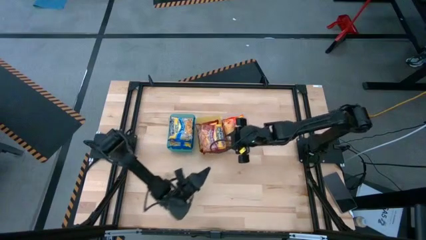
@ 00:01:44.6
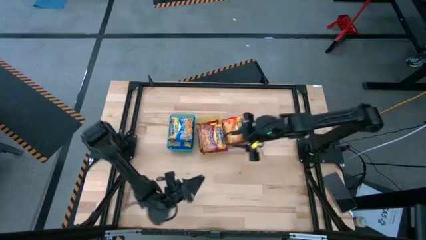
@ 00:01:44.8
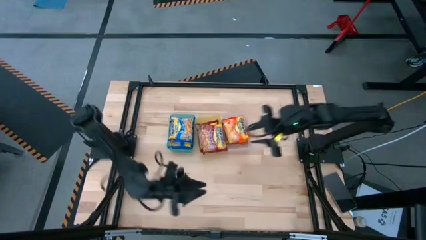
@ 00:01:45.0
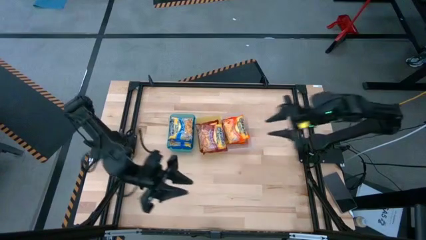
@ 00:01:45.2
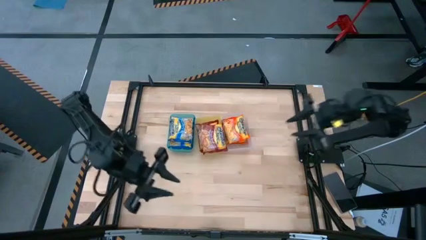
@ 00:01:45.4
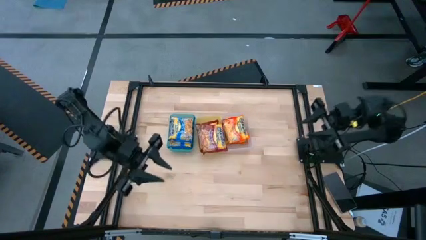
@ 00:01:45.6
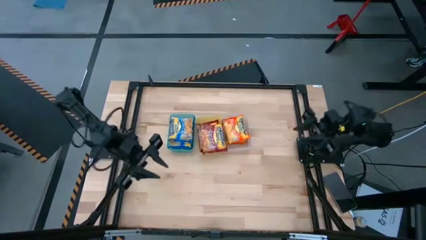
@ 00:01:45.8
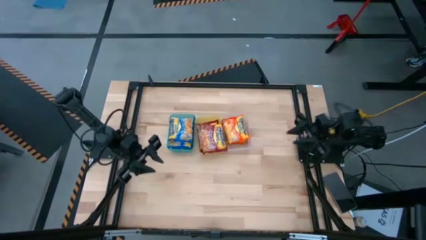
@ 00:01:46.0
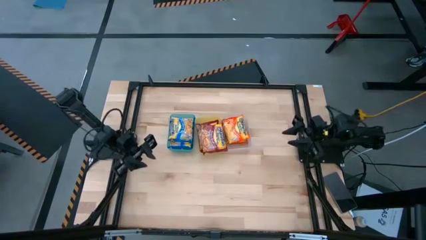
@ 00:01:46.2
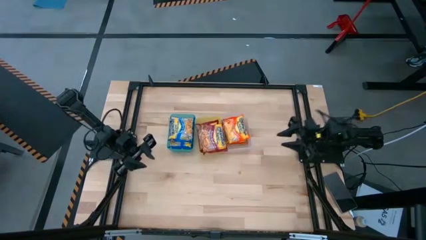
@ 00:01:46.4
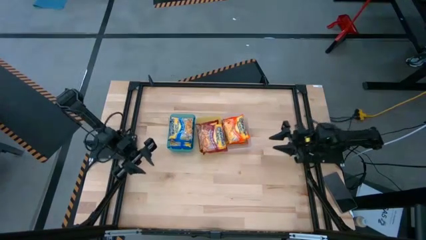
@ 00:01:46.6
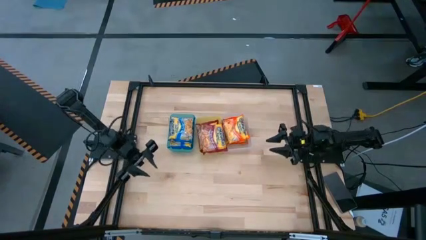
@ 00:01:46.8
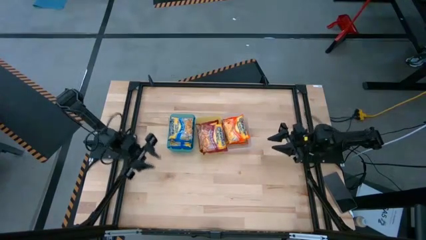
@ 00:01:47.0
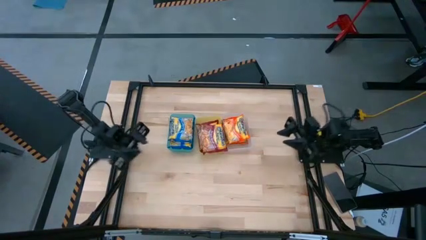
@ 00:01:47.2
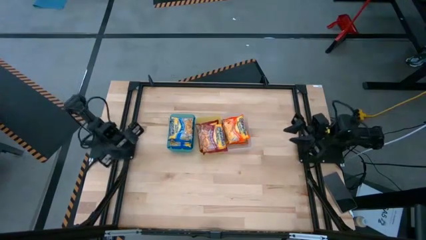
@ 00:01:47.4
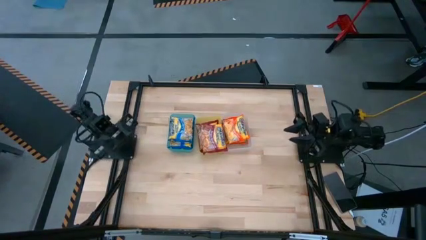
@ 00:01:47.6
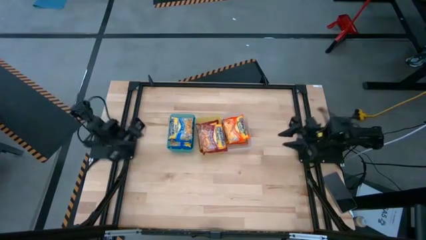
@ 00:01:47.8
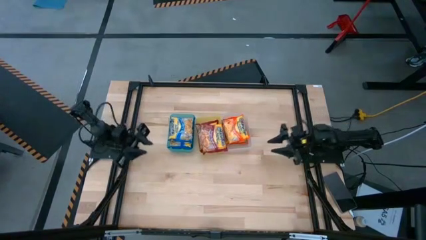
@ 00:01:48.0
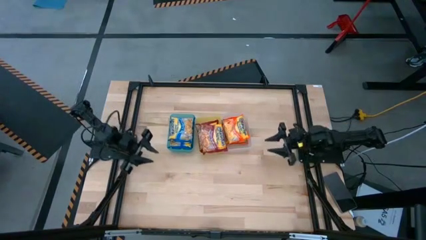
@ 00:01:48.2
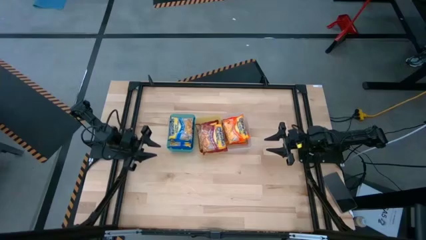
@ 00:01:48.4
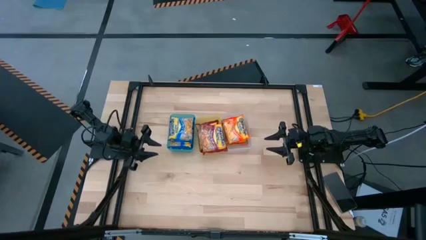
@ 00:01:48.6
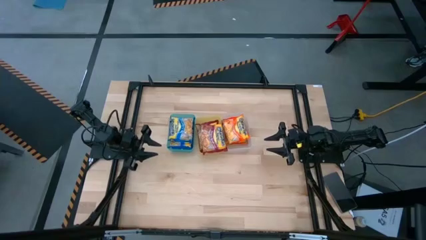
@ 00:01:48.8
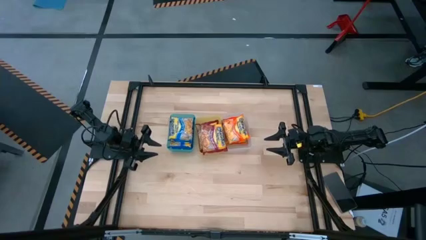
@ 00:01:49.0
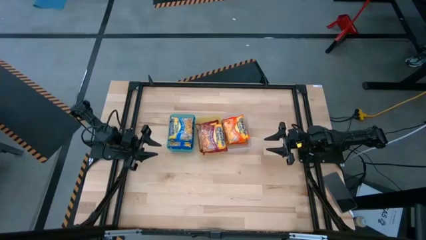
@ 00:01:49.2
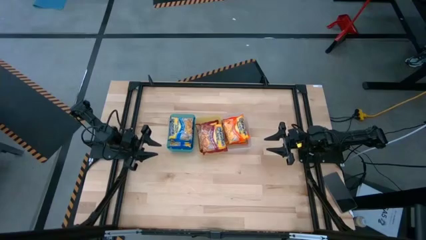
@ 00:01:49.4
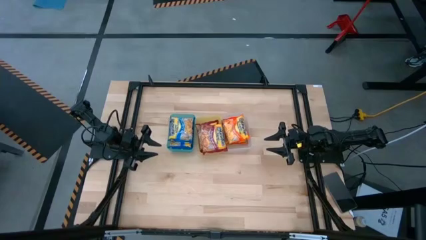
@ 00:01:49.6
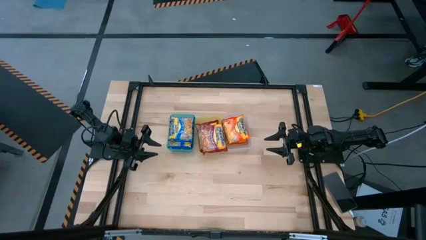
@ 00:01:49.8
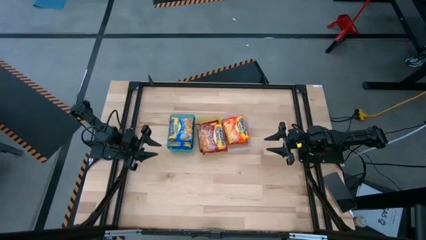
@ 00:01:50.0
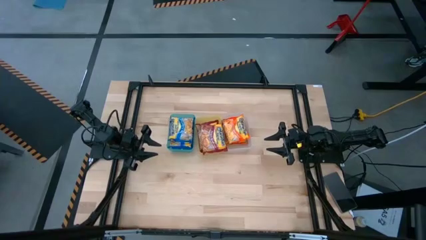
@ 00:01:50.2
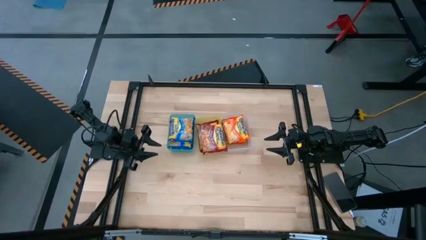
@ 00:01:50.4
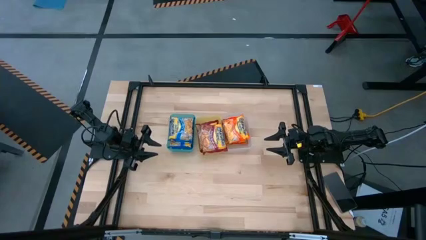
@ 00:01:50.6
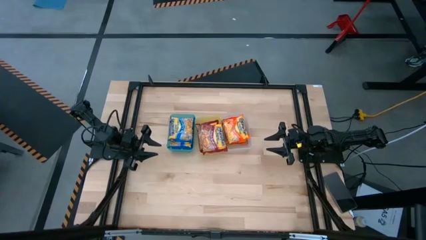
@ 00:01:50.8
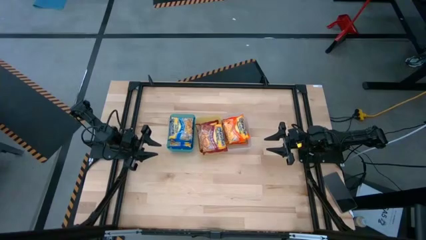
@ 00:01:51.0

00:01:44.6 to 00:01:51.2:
Task: Sort Maruchan noodles
Return to Home Position

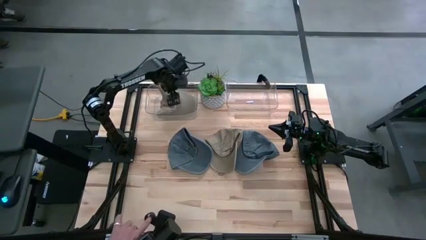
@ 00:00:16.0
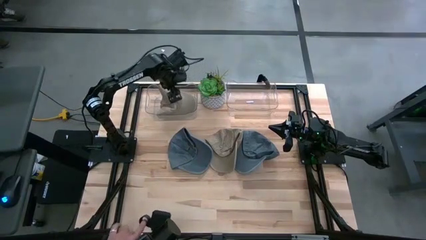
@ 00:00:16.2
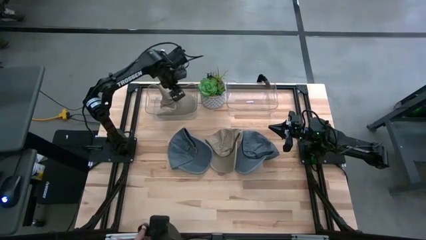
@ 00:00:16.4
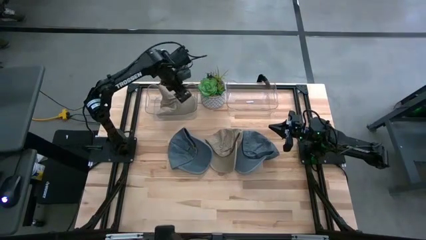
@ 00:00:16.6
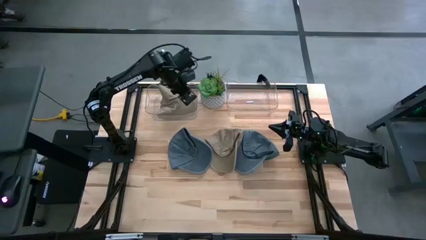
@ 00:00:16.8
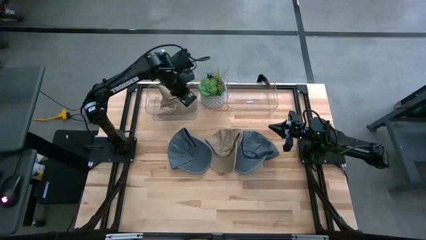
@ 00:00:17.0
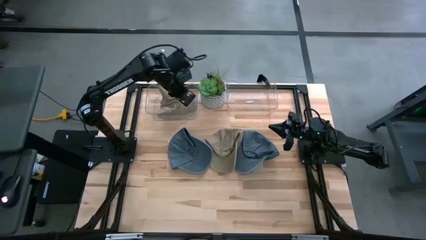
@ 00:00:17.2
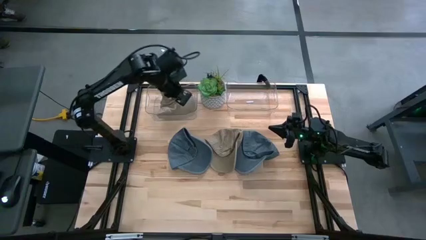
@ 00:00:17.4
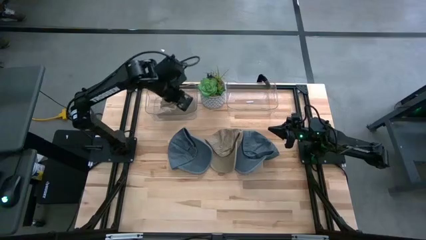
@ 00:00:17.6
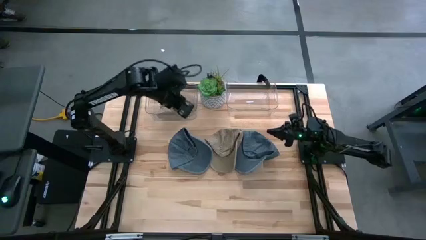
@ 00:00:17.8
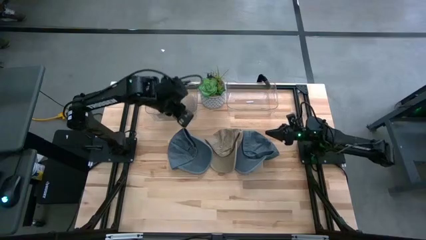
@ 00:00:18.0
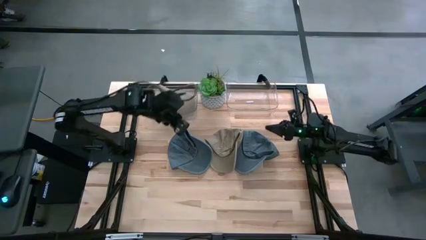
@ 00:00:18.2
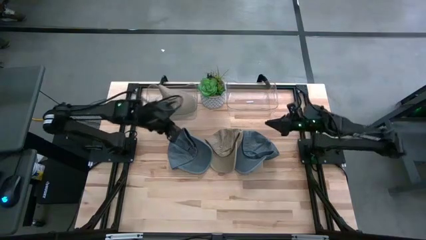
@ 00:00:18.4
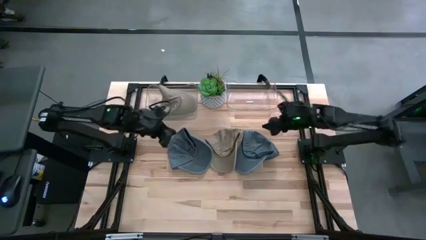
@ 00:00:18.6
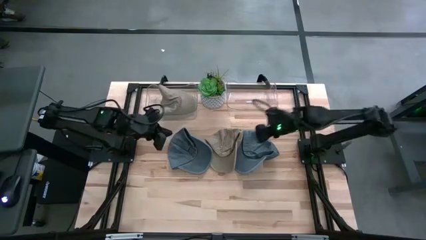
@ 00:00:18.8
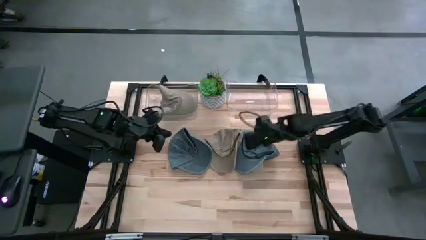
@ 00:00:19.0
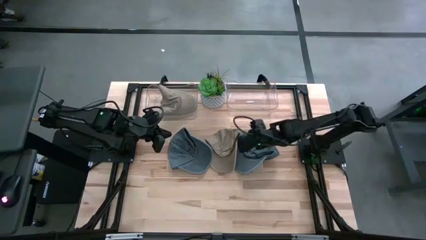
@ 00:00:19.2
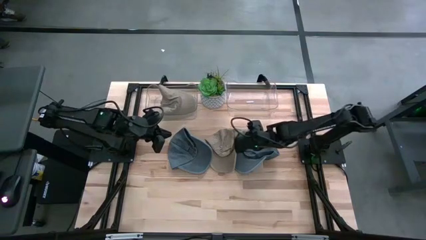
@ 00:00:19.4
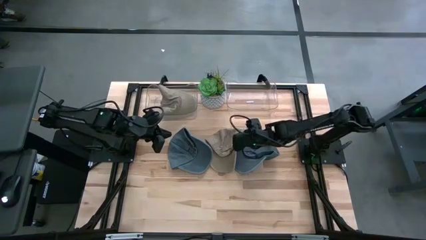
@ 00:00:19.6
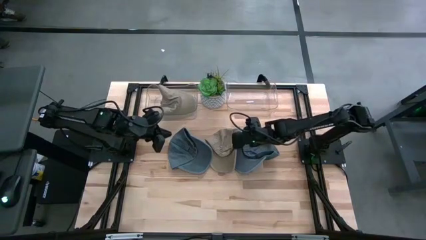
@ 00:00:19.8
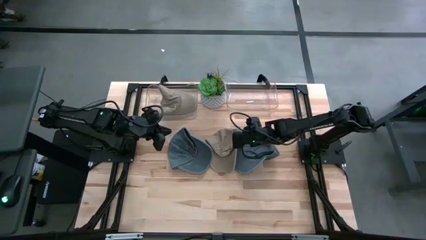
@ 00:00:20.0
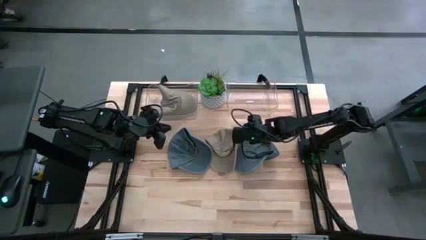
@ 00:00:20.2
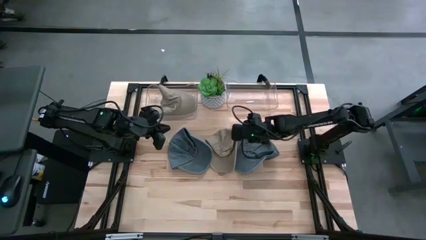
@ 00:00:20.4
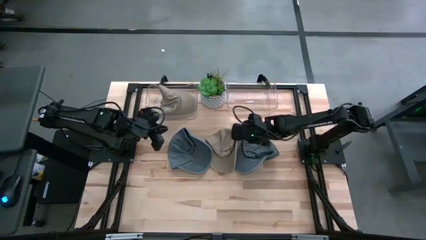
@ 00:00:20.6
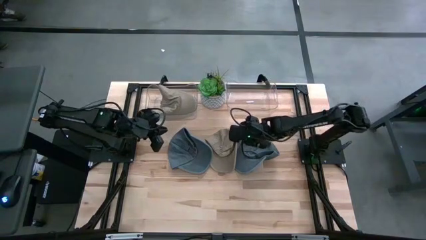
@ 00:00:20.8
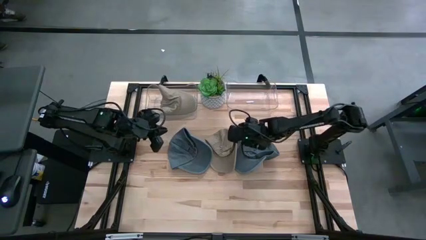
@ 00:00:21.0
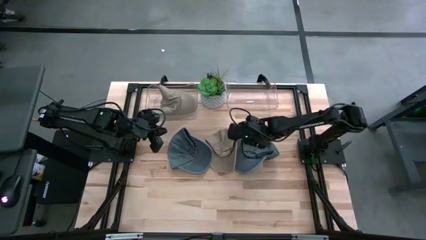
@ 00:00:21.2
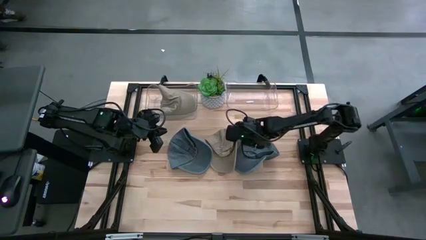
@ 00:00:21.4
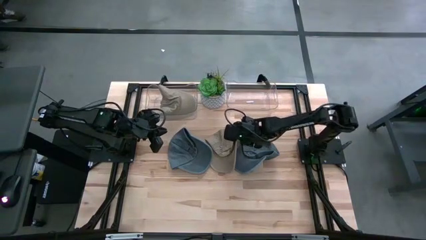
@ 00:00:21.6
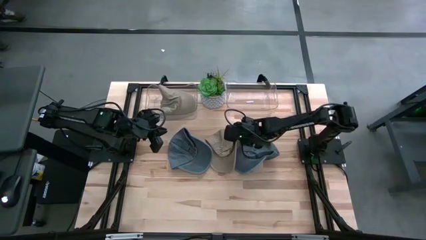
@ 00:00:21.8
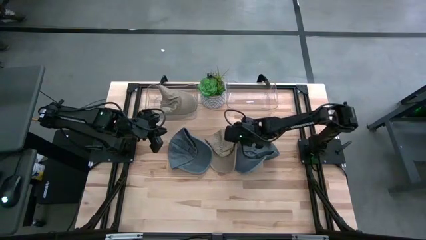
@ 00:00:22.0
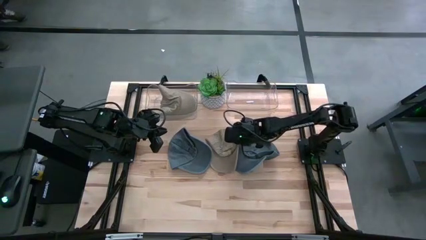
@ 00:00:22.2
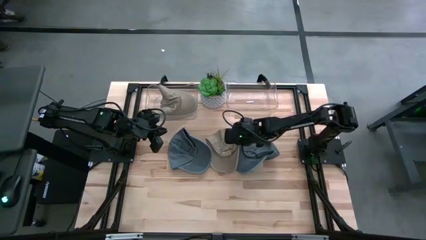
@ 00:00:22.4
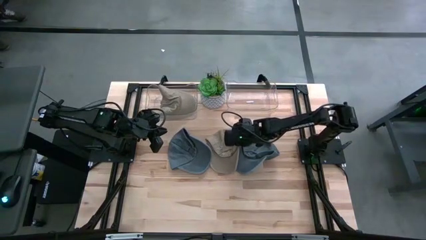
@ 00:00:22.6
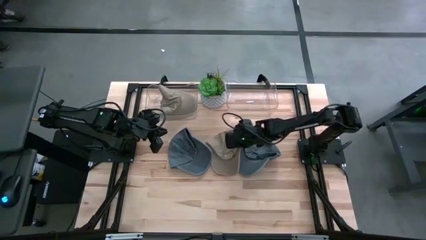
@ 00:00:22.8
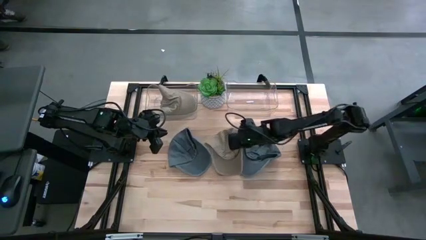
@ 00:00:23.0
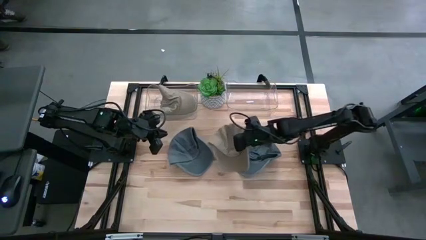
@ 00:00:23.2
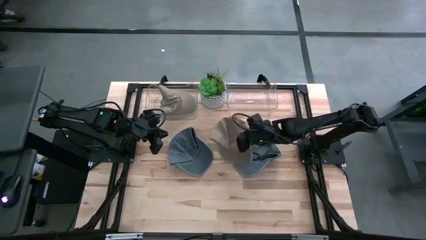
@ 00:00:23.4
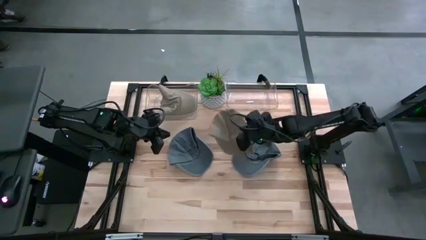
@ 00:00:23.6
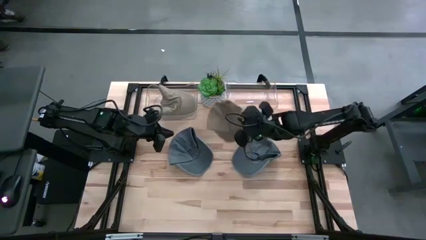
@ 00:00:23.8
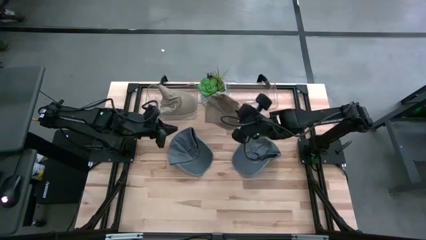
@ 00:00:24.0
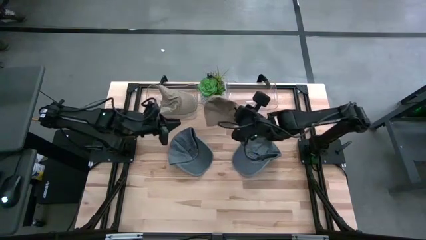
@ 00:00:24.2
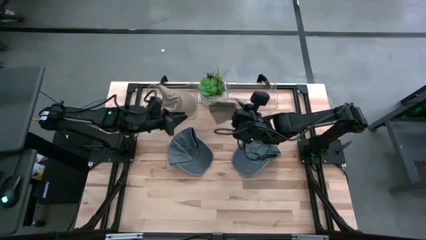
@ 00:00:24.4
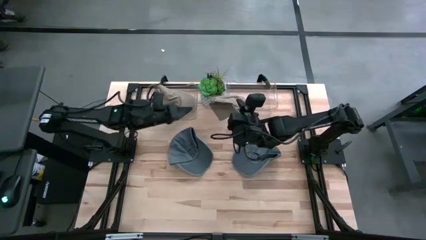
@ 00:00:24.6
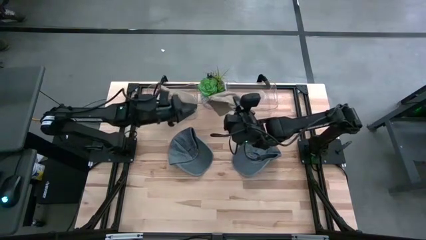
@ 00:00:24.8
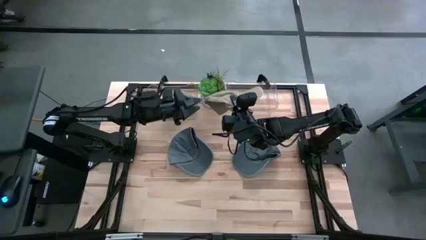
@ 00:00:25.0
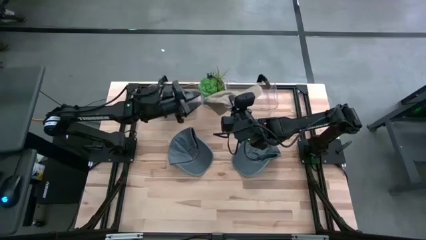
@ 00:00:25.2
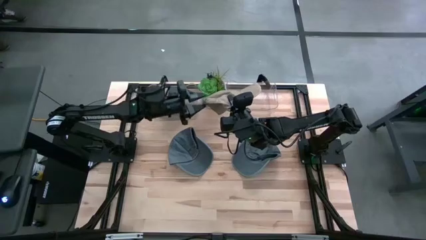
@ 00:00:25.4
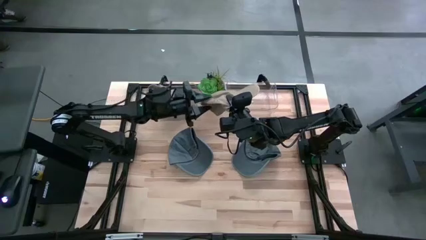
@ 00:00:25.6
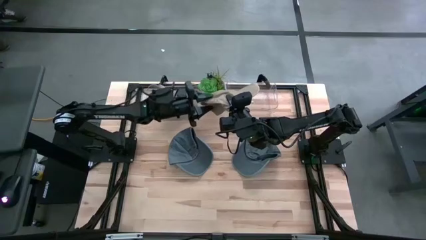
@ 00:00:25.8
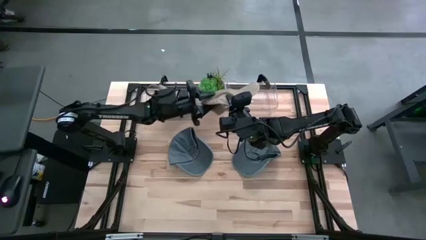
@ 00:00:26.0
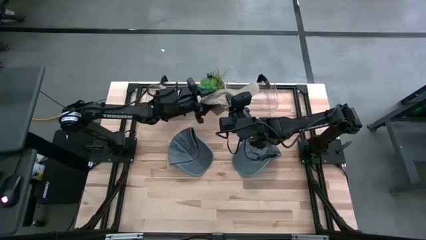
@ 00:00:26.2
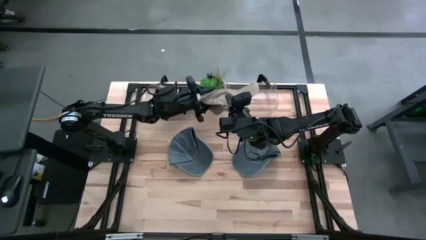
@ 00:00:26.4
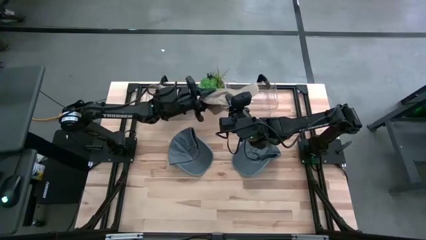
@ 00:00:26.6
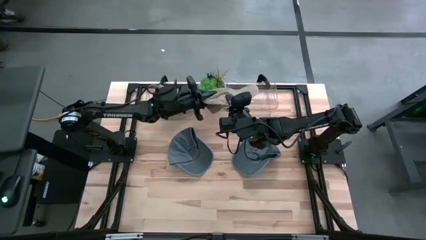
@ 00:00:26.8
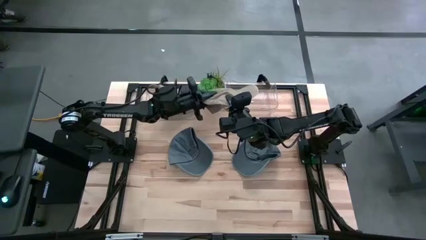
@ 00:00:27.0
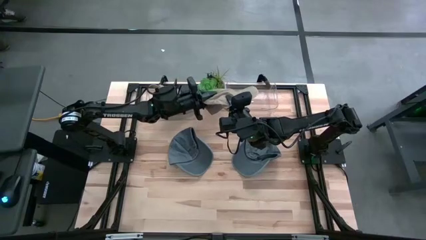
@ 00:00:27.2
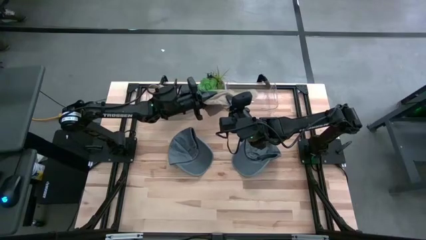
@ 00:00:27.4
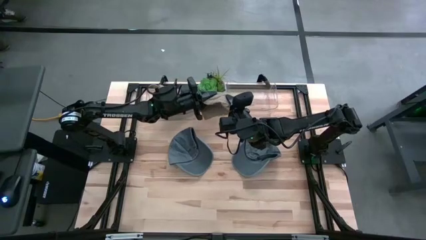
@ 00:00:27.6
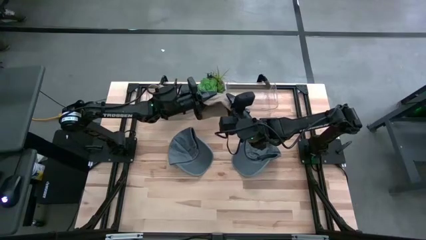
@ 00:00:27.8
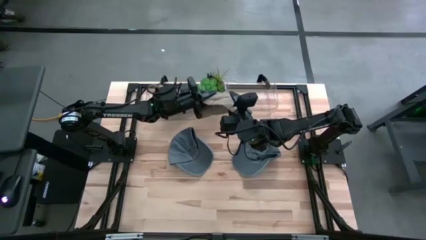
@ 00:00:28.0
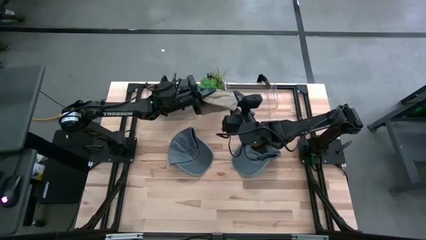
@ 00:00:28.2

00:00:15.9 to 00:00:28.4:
Task: Pick & Place hat
Put the brown cap into the left transparent bin
